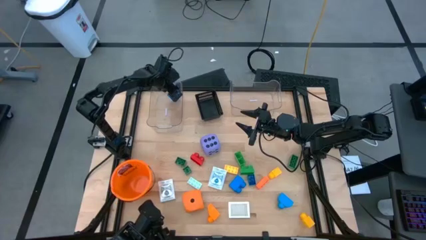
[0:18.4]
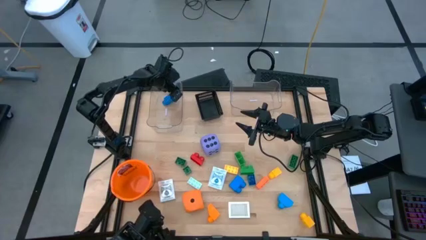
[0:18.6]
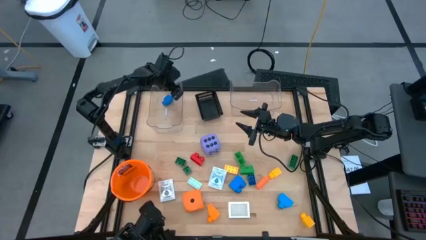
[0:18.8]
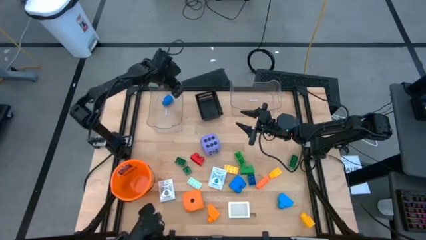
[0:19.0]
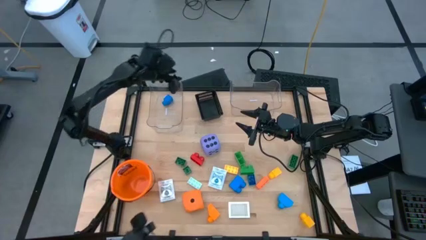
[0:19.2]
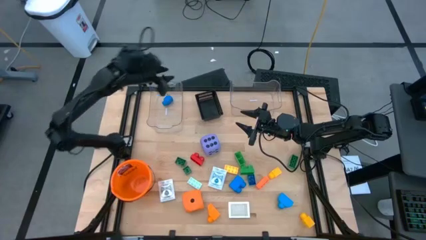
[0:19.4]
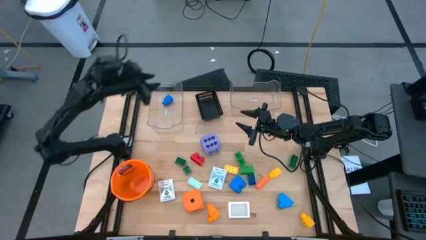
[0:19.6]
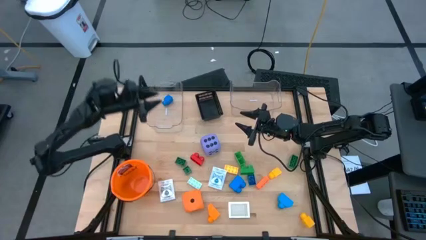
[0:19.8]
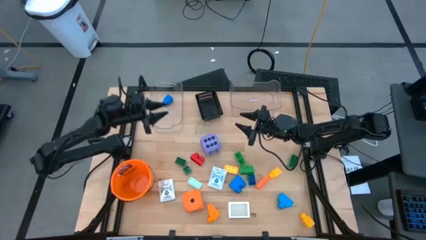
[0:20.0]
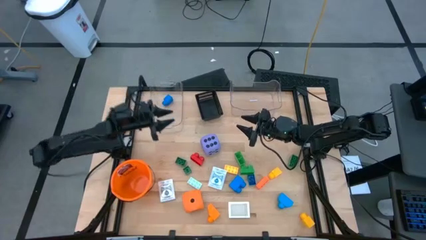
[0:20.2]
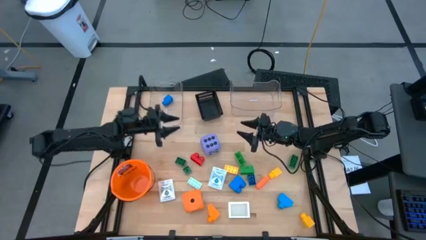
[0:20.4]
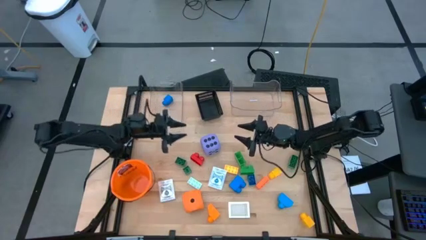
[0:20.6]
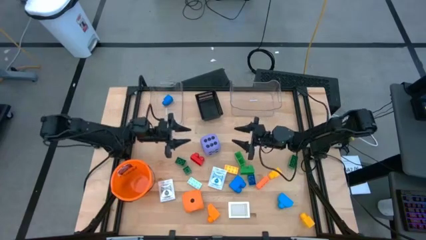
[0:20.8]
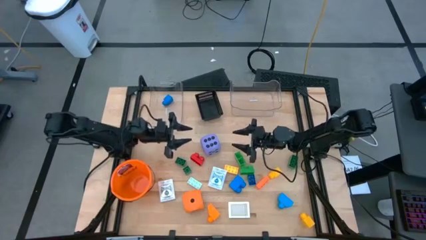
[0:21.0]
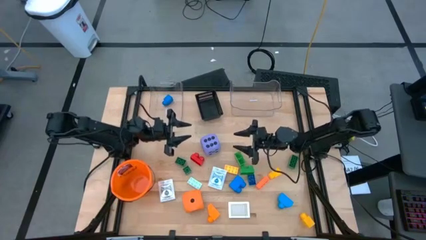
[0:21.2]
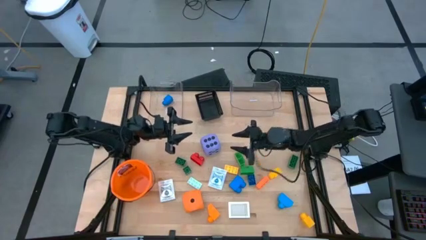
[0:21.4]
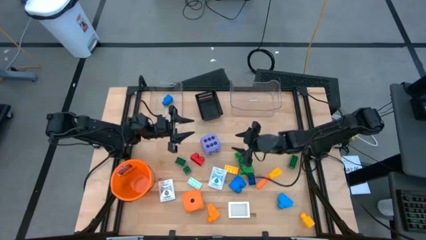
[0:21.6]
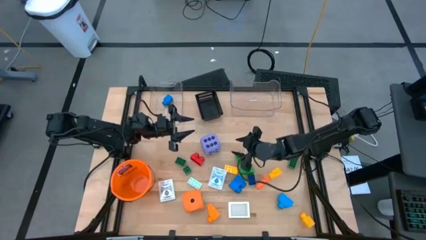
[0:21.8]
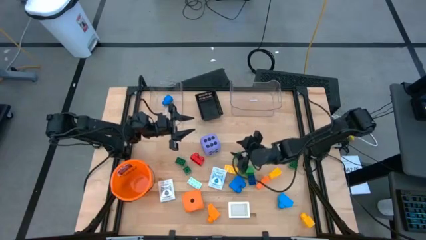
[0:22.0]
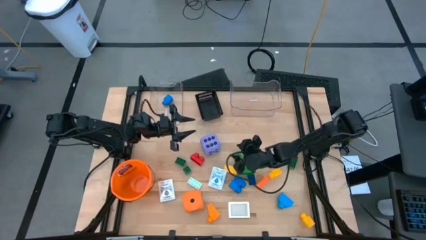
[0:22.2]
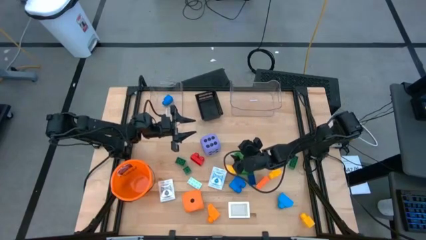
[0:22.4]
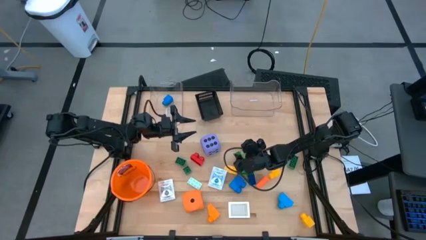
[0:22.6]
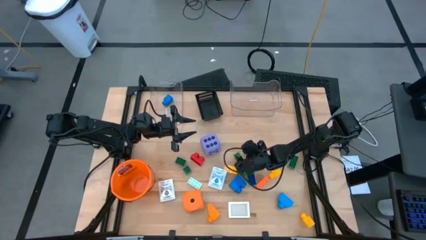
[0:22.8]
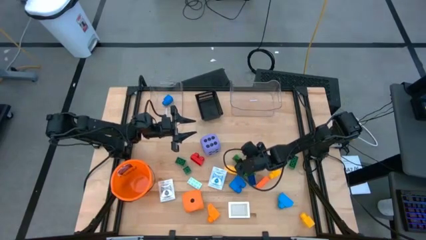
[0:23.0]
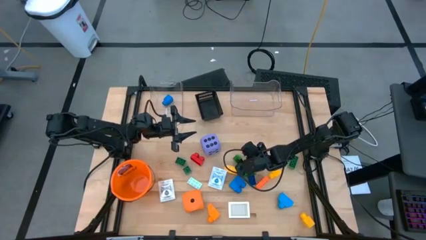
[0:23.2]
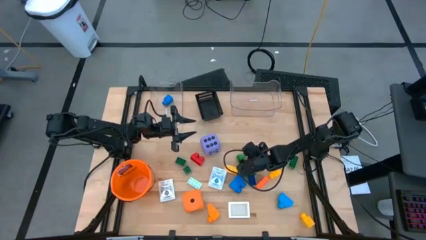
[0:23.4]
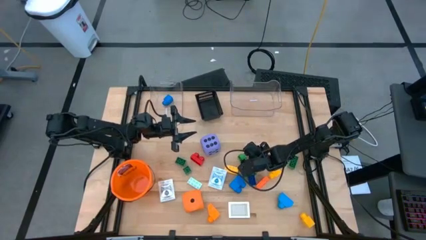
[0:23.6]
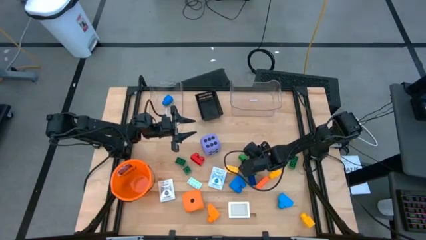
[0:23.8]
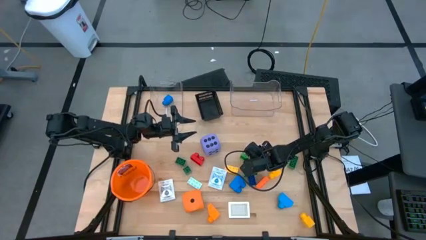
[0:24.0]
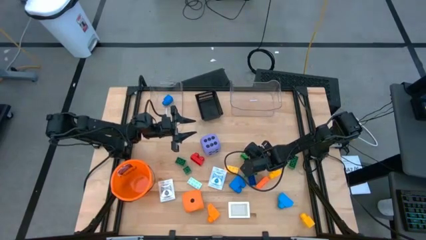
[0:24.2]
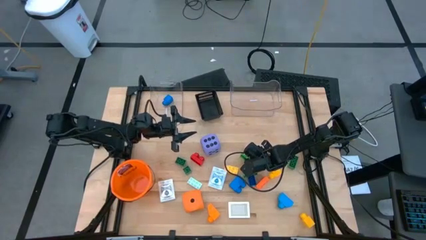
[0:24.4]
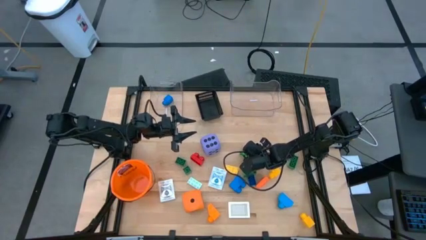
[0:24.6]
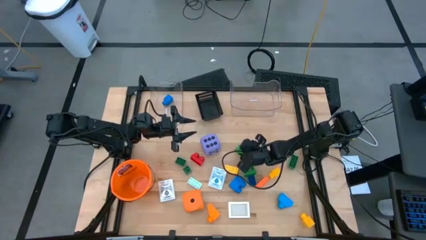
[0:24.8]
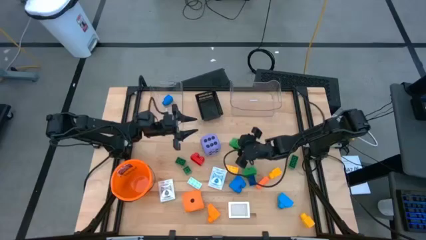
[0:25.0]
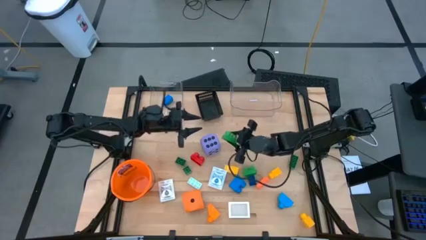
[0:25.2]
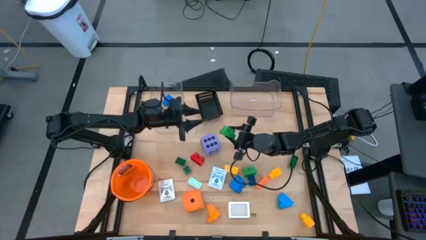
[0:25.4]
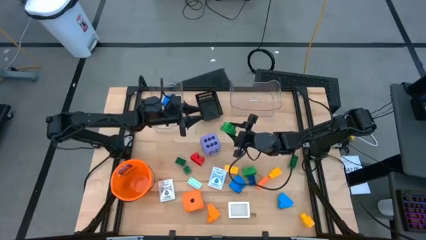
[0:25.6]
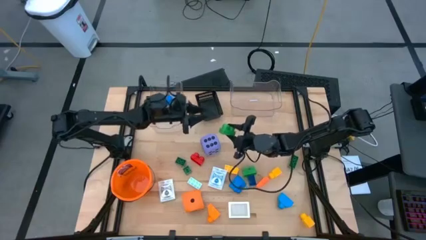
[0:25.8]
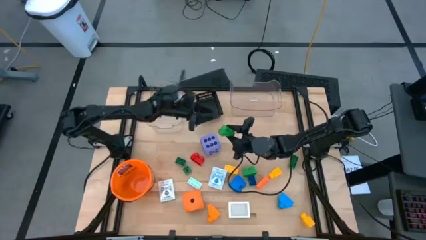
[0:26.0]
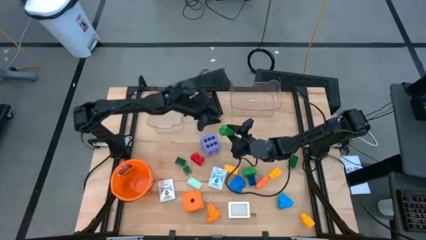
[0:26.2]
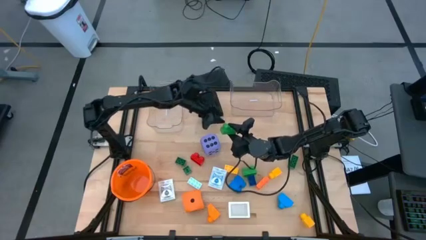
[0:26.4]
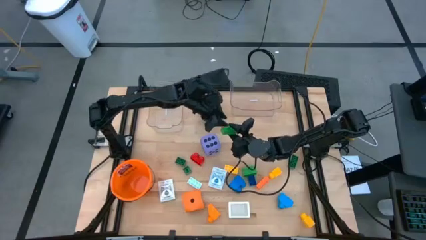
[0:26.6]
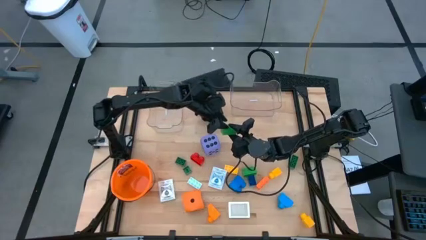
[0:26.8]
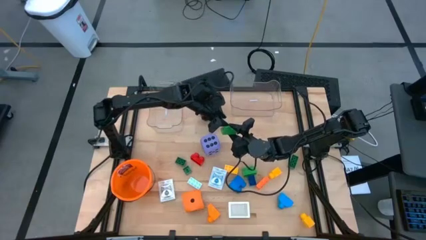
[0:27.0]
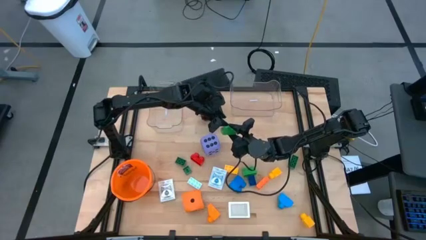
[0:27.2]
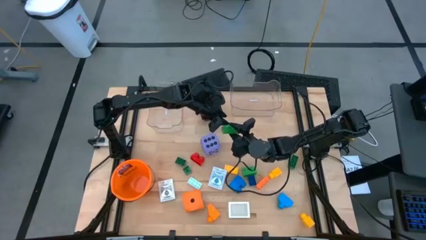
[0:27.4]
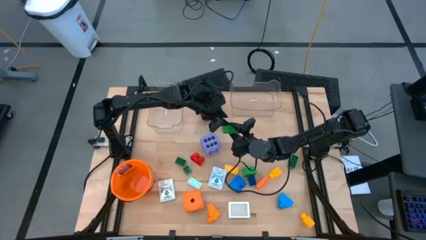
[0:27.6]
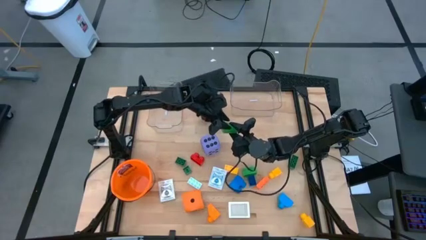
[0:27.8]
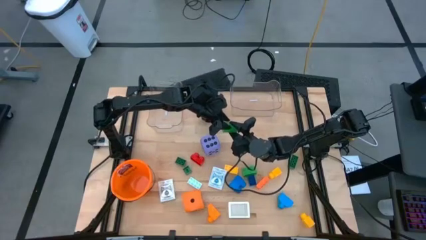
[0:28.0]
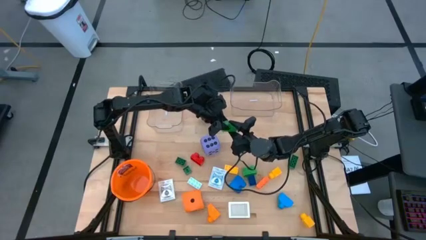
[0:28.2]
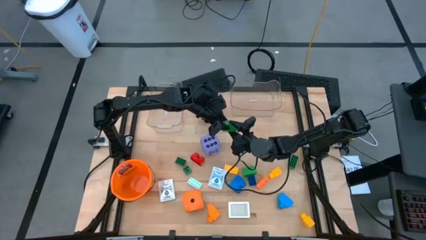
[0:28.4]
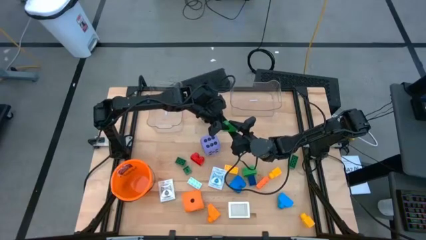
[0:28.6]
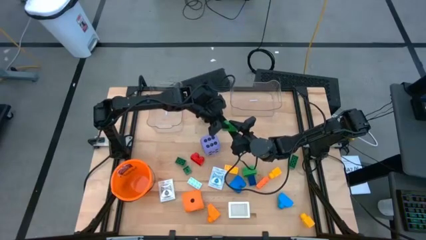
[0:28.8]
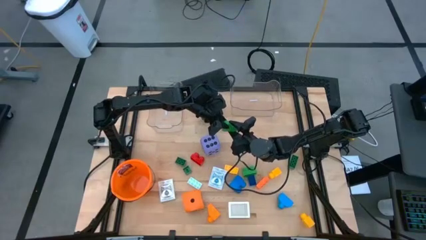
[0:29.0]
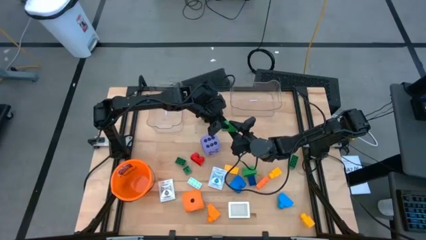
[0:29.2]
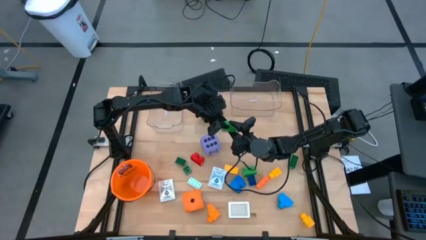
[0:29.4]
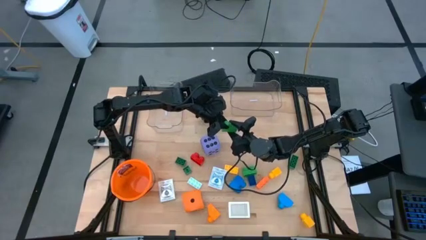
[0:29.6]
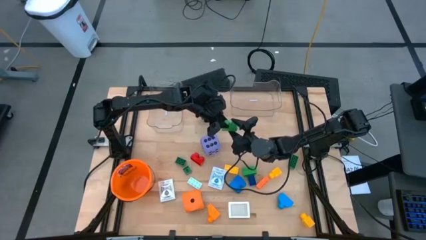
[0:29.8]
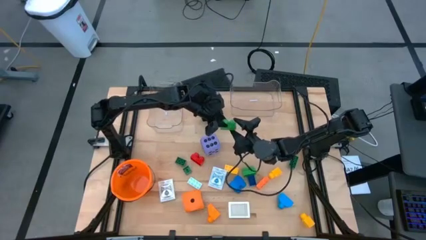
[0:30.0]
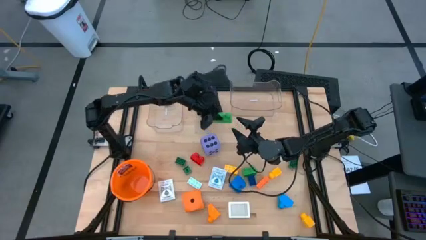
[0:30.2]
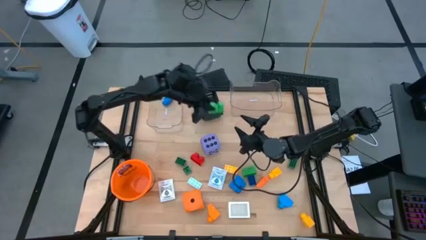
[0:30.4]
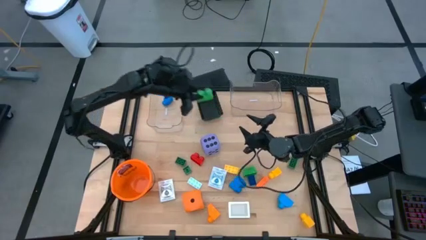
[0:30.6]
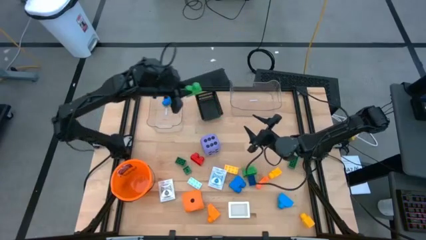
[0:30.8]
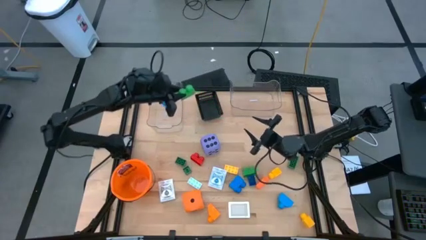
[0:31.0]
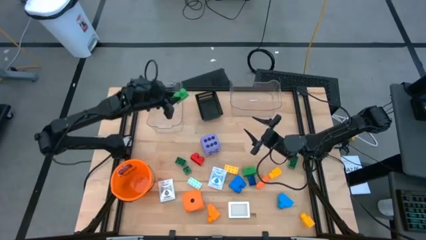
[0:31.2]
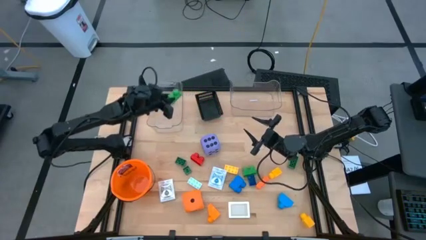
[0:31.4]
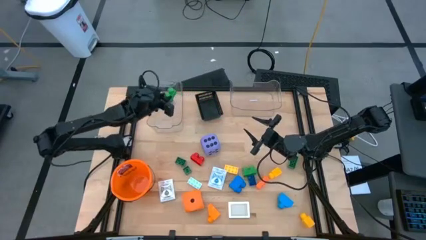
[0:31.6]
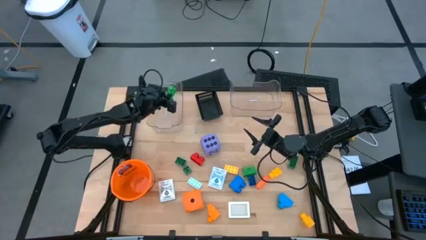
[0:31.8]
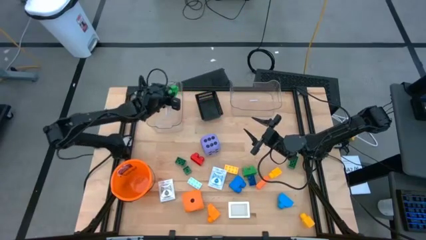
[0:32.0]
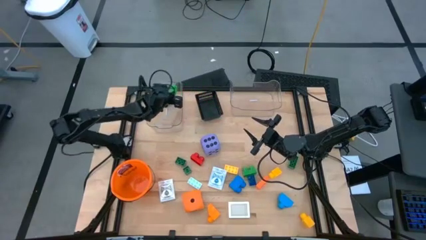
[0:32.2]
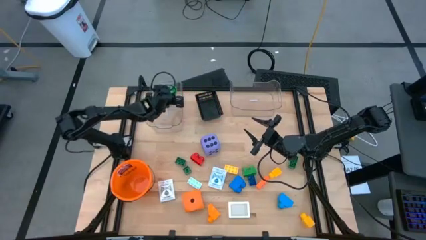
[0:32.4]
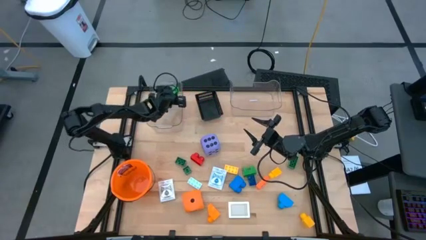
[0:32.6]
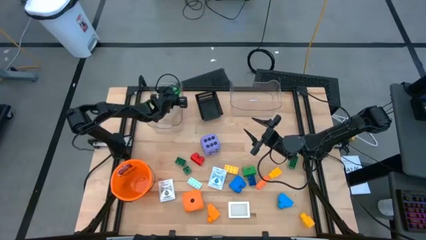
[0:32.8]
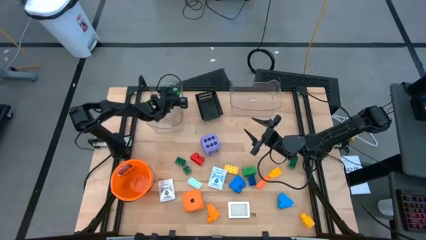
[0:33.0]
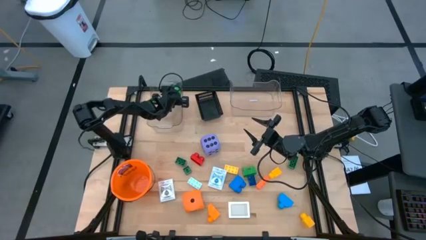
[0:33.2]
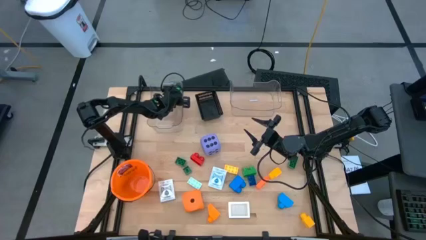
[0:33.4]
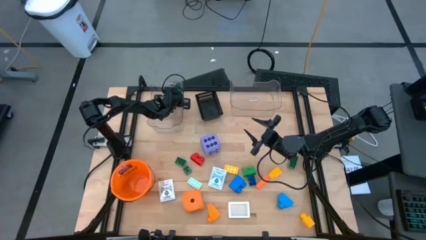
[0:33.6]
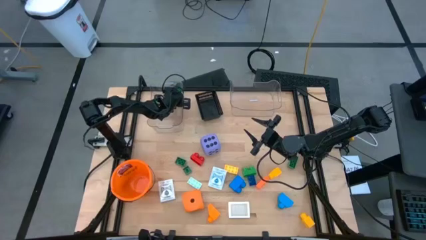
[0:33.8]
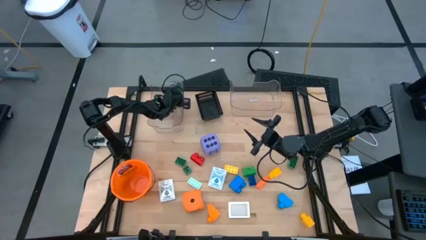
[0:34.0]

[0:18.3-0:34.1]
Task: Pick & Place Toys
Put the green gamepiece into the left transparent bin
